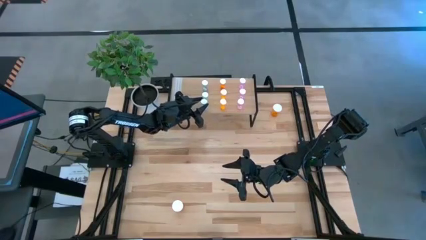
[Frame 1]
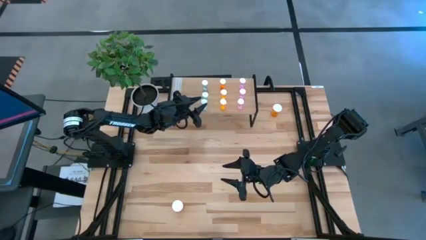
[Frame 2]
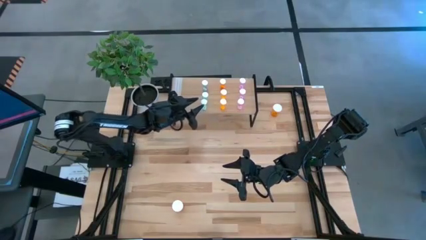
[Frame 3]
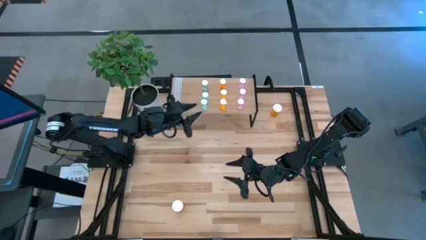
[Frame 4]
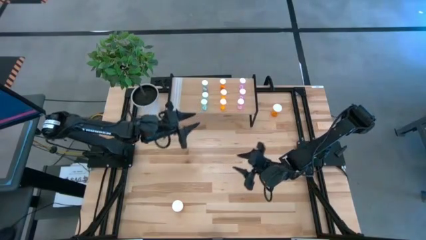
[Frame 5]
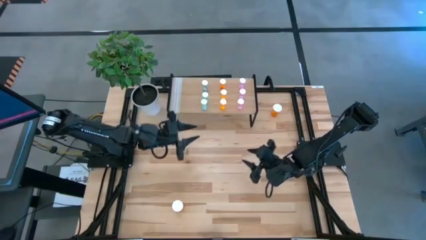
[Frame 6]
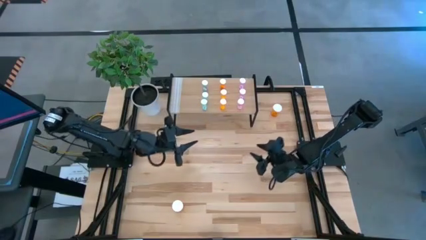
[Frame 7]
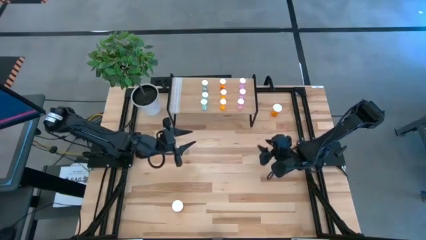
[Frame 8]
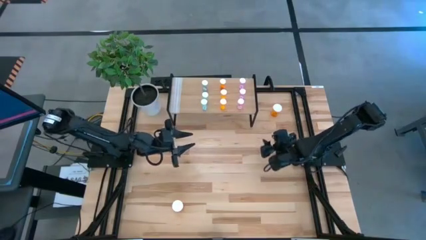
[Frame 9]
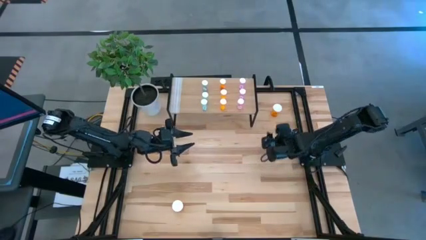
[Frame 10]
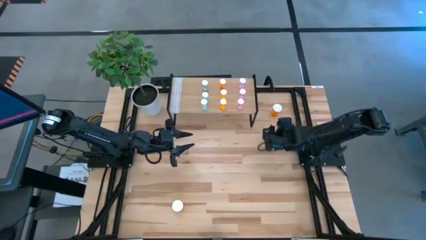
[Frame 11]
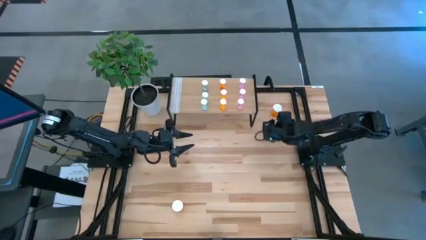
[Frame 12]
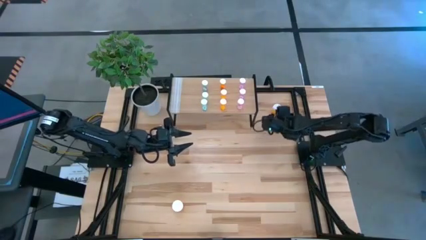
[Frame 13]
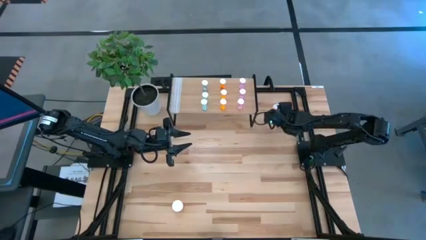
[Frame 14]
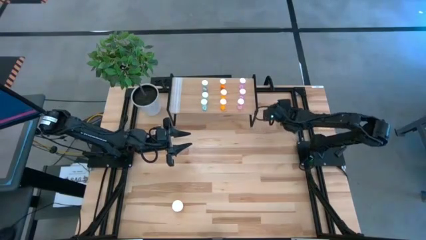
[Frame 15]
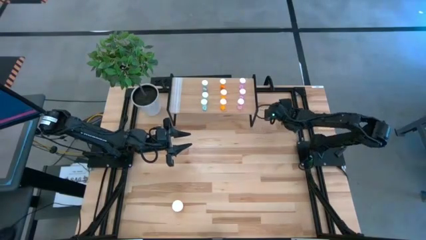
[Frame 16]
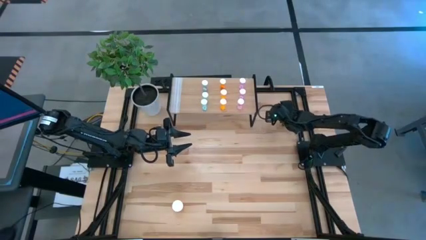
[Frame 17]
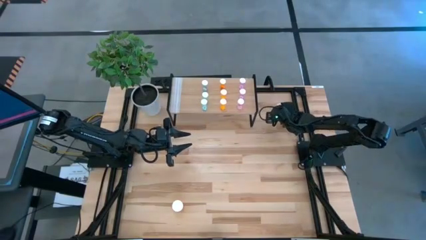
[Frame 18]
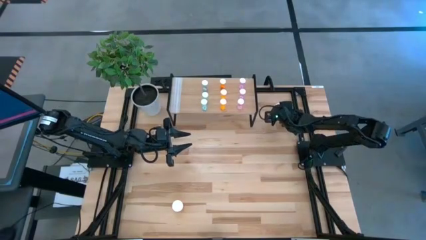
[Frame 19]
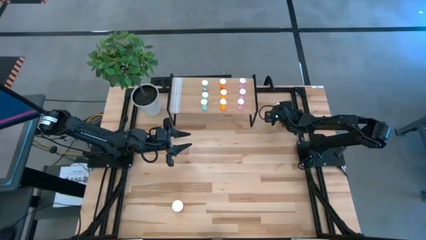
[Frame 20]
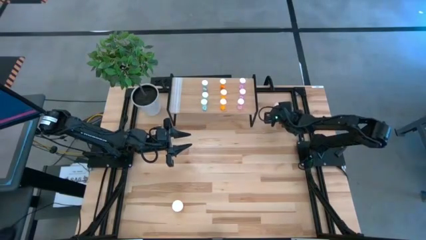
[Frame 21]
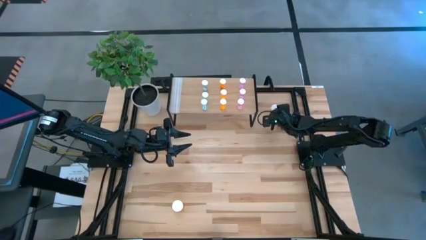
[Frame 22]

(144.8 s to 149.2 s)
Task: Pick and place medicine bottles onto shelf by color
Put the top large orange pill bottle on the shelf

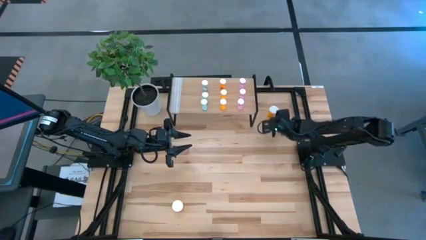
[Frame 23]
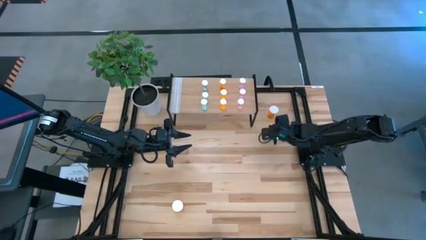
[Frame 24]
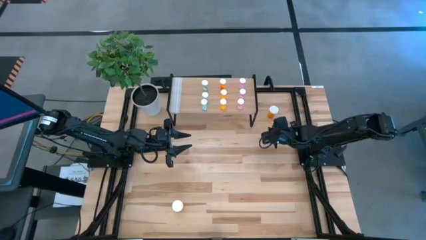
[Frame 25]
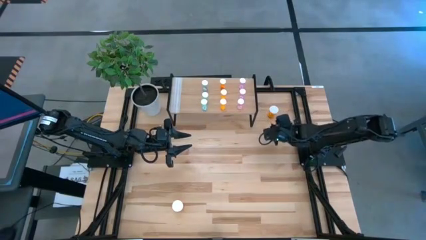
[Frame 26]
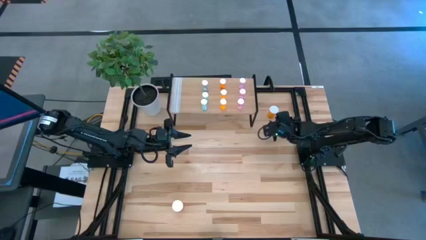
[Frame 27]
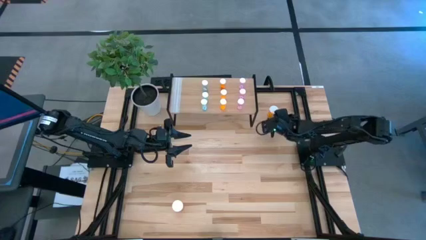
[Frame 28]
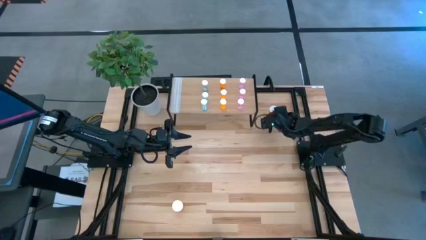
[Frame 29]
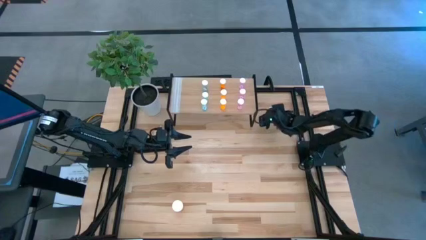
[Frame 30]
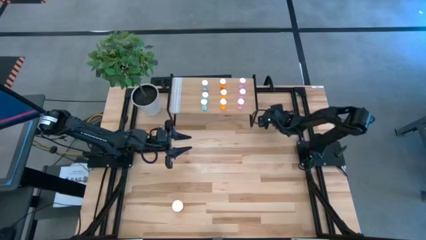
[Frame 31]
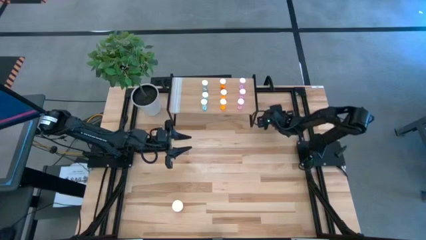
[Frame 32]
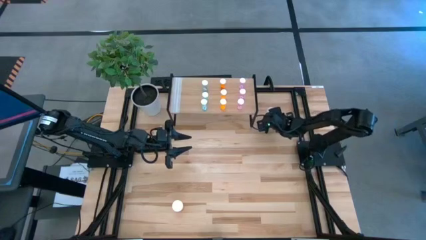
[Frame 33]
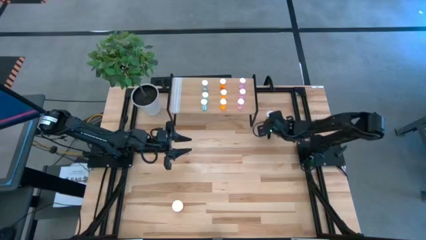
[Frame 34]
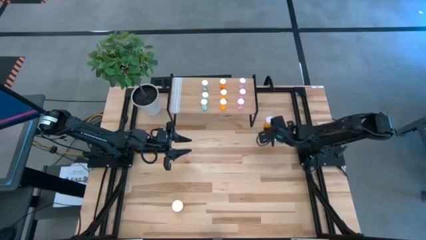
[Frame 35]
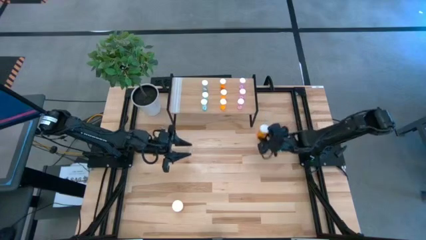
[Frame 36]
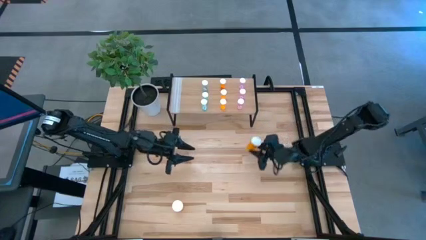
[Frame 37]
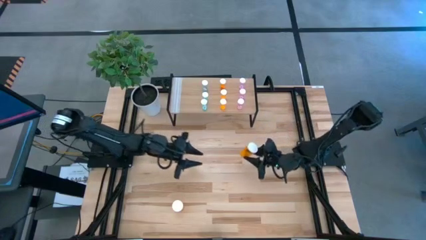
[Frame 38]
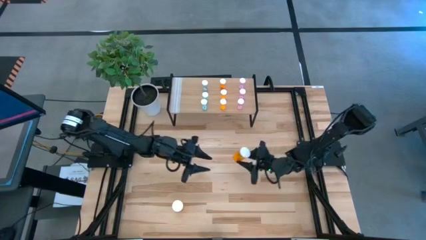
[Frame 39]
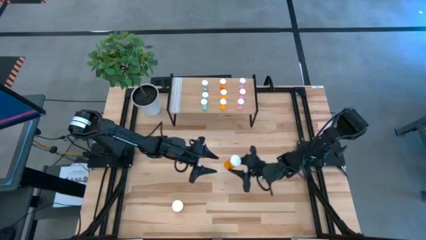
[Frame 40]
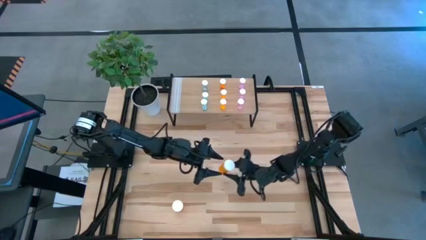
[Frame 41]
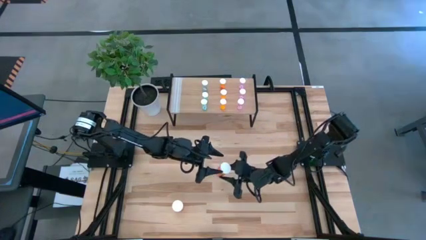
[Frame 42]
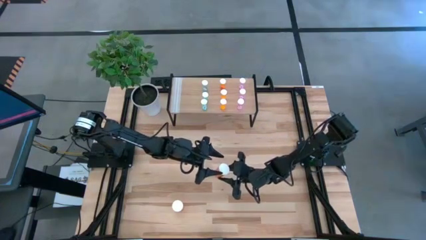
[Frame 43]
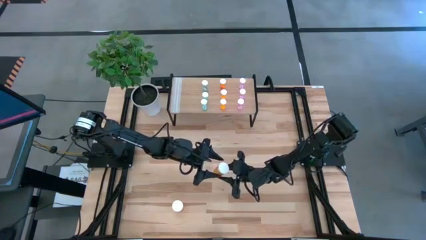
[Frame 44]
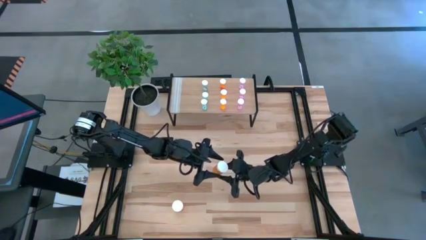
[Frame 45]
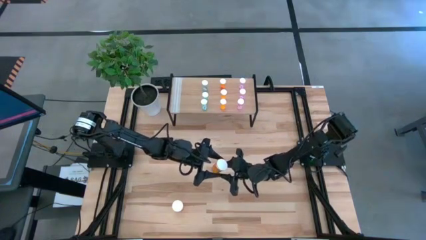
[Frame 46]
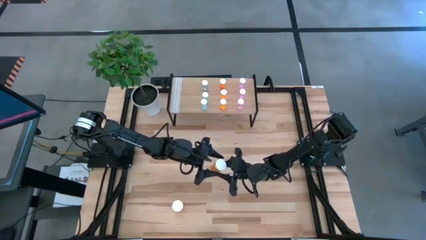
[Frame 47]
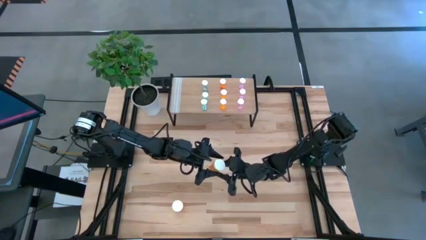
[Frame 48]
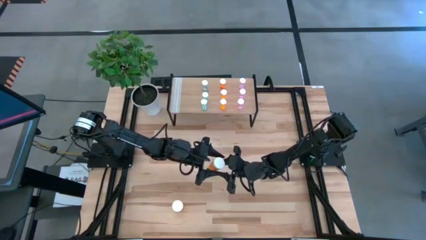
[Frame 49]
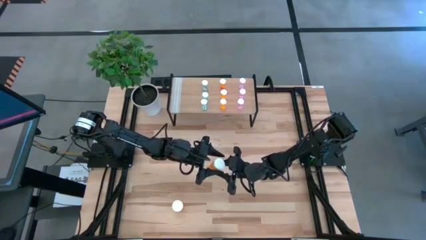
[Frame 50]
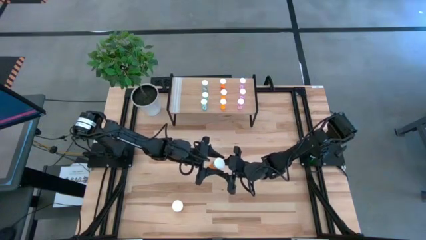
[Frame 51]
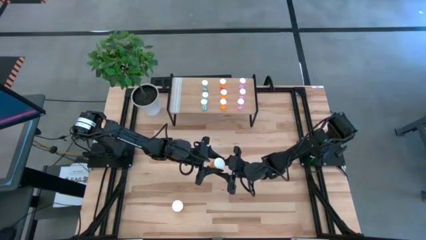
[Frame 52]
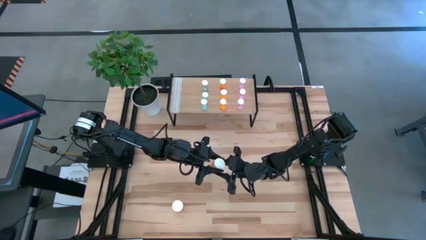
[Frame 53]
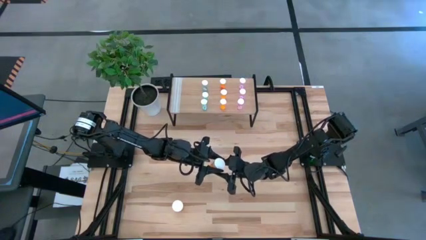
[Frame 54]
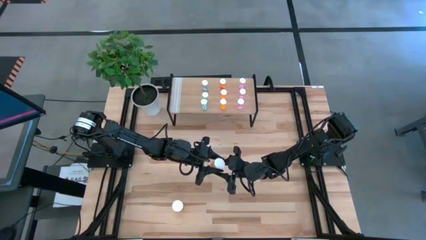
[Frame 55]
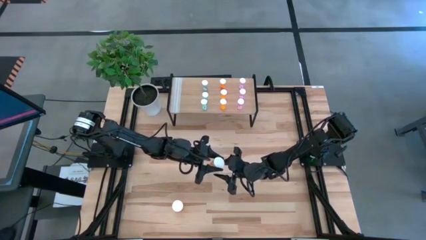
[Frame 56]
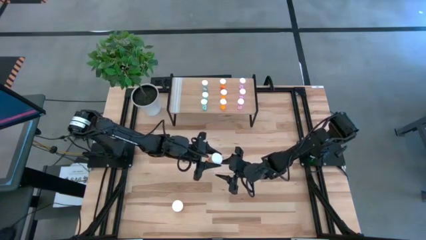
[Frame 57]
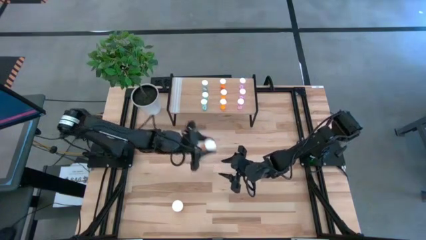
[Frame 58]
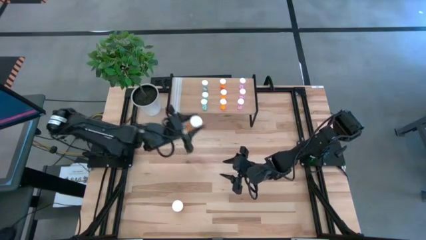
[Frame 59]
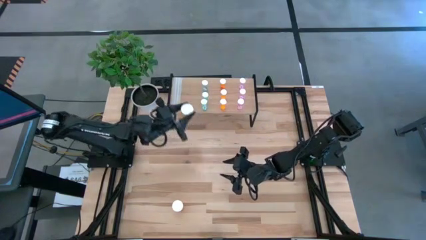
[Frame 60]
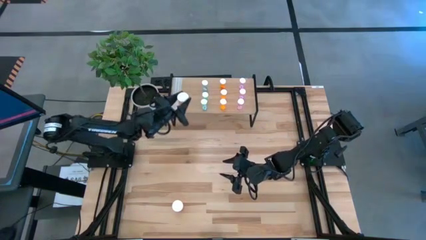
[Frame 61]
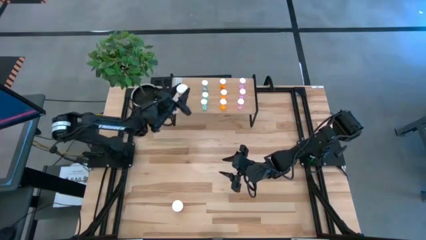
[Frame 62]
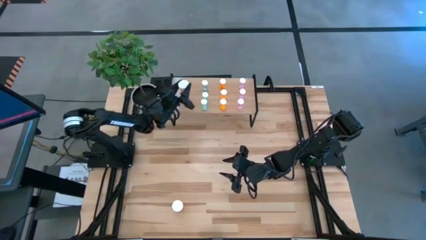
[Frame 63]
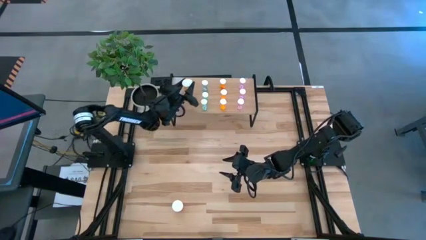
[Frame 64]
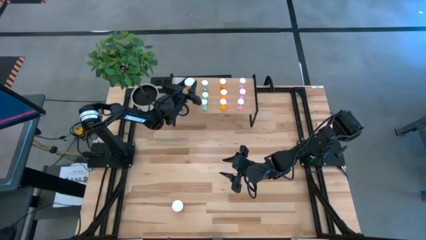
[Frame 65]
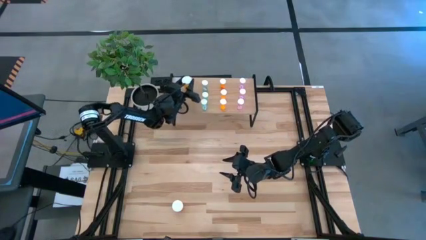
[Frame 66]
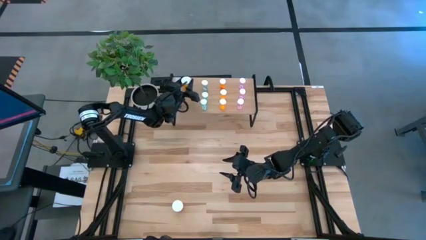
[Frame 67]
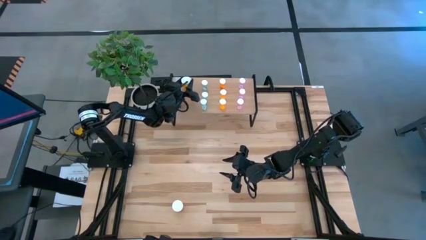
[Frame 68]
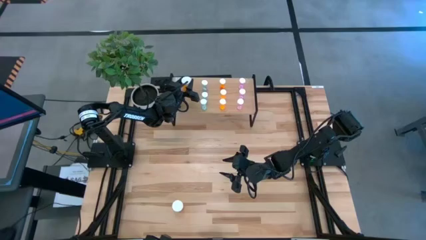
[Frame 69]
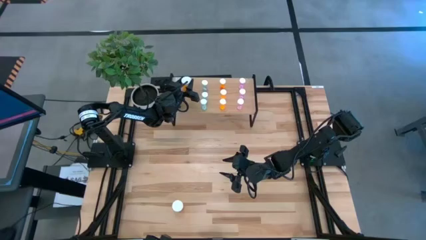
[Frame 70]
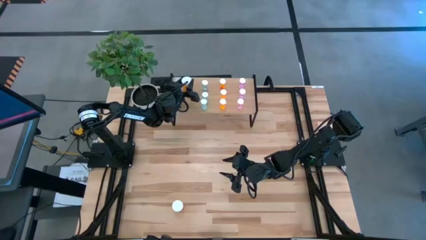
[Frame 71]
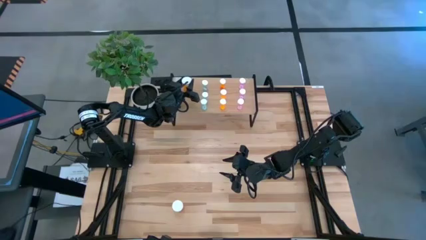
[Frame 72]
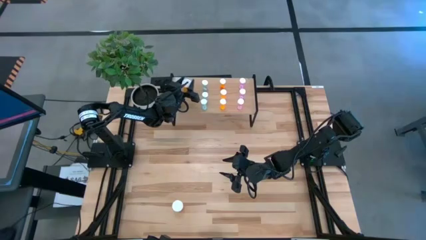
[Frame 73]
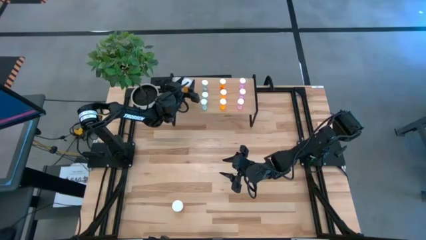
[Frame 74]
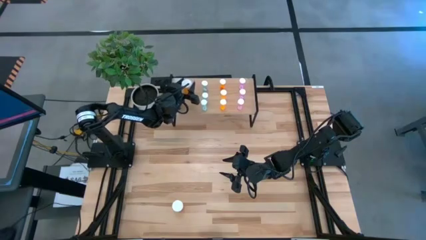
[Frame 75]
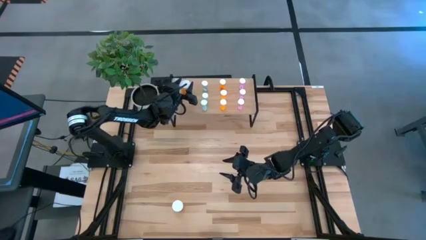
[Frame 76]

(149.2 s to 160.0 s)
Put the top large orange pill bottle on the shelf

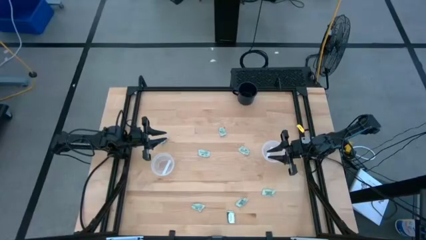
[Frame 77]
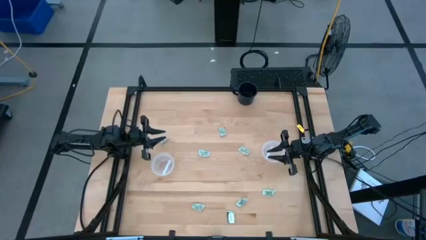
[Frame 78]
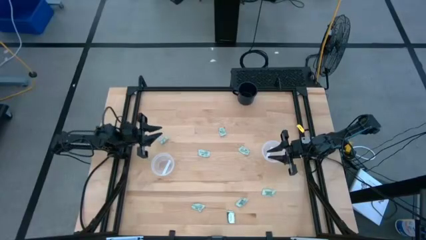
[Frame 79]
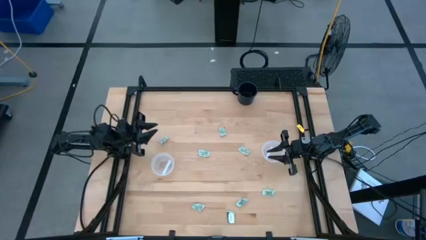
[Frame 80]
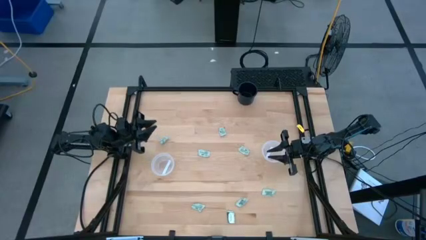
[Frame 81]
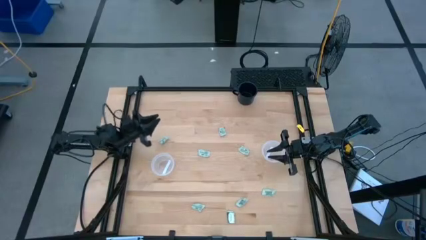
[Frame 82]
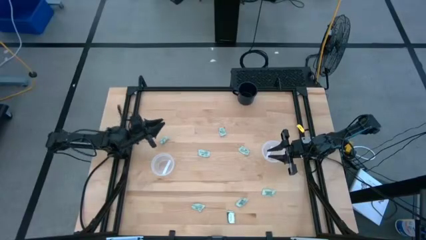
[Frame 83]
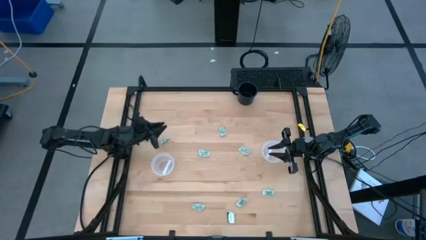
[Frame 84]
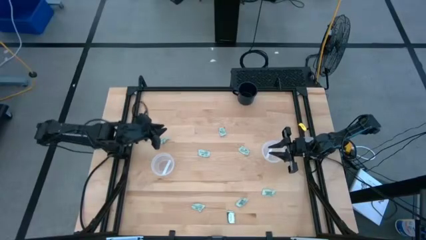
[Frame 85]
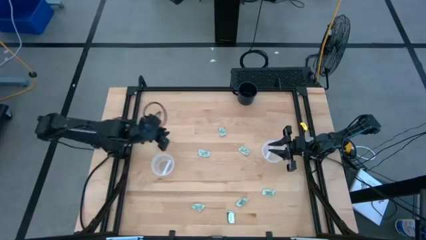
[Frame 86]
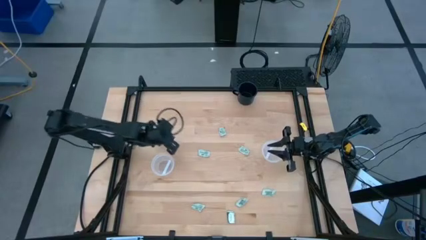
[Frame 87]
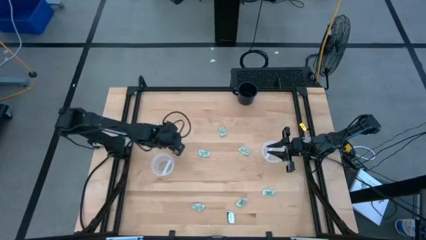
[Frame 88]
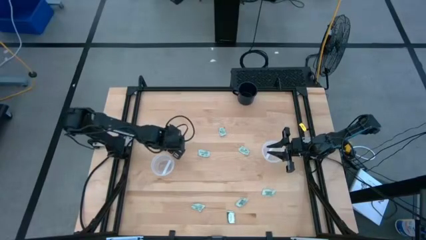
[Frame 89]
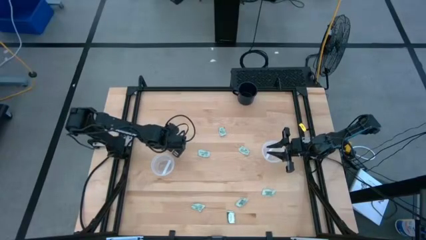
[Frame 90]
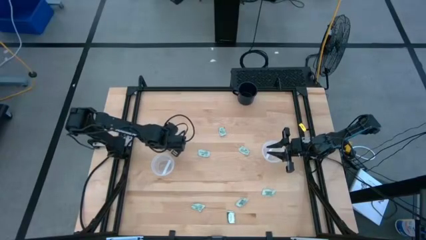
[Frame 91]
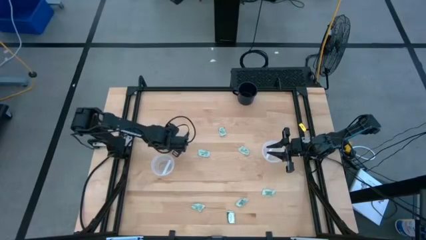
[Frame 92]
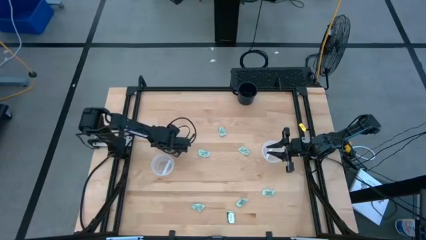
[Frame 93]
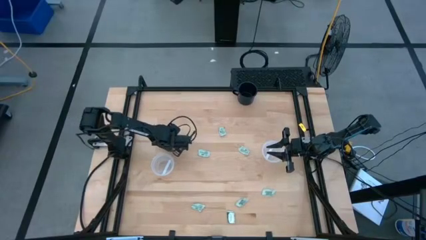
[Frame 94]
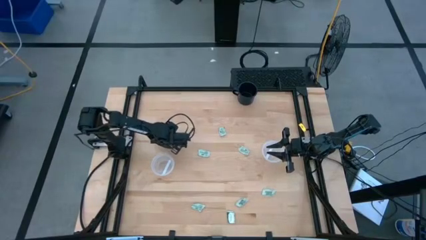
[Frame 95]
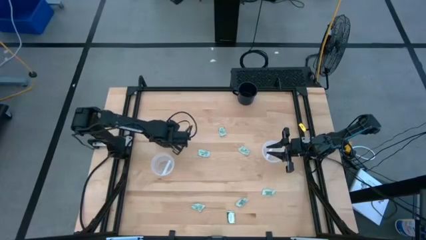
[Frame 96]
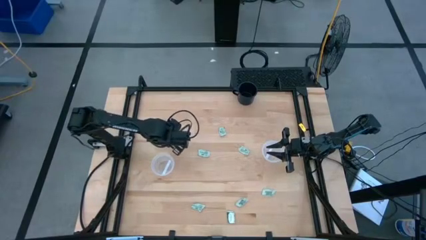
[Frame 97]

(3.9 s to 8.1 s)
Task: Pick and place items into bin
Put the stevia packet into the left transparent bin
